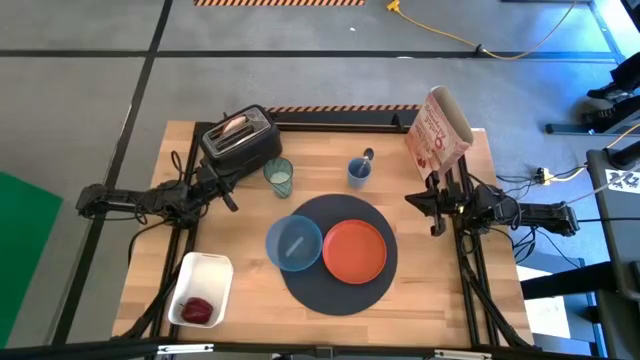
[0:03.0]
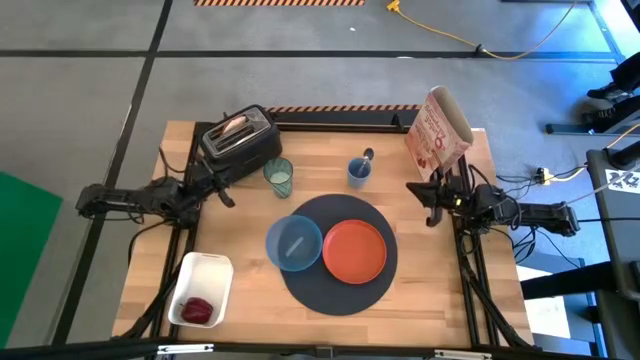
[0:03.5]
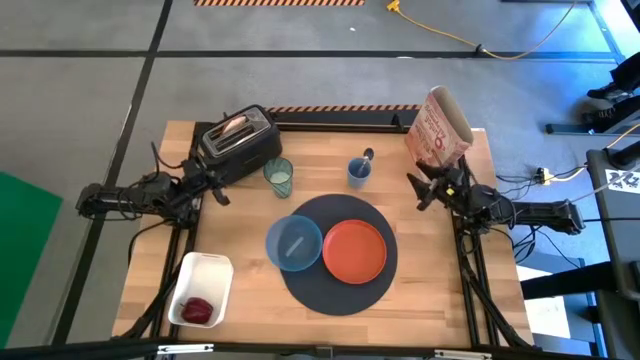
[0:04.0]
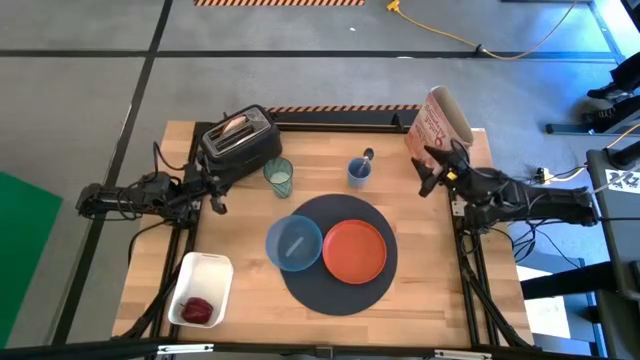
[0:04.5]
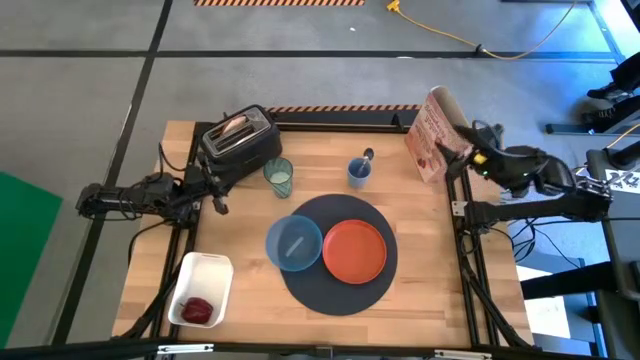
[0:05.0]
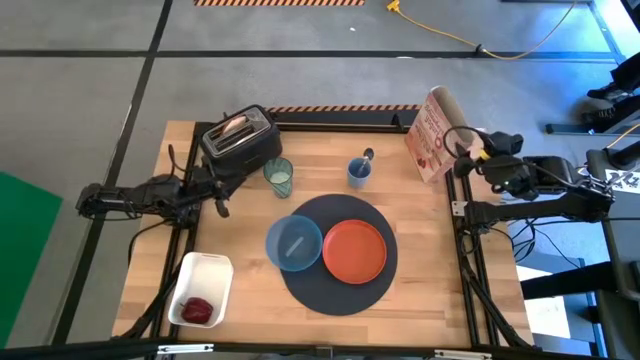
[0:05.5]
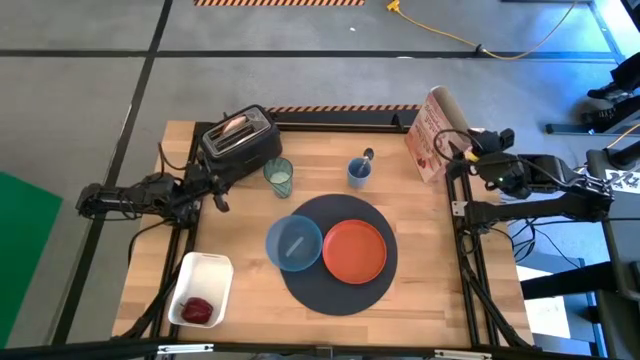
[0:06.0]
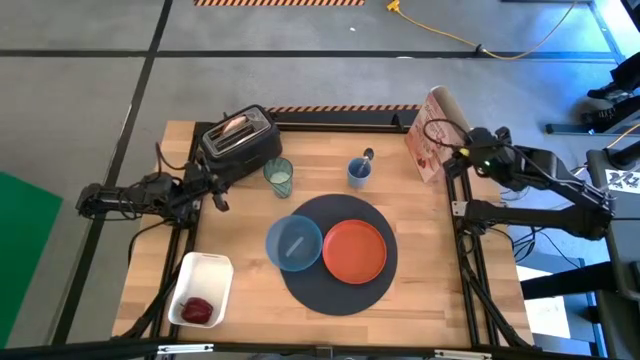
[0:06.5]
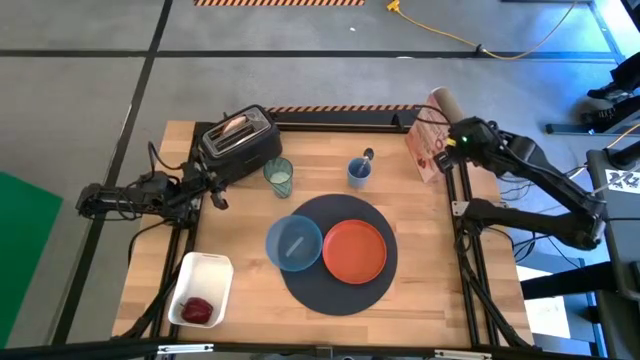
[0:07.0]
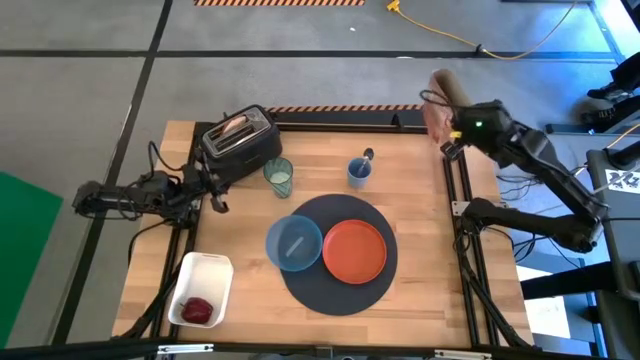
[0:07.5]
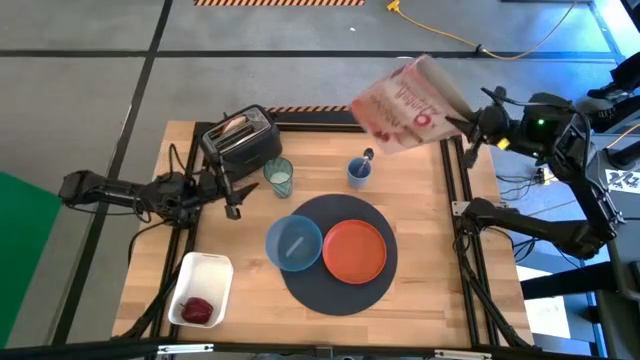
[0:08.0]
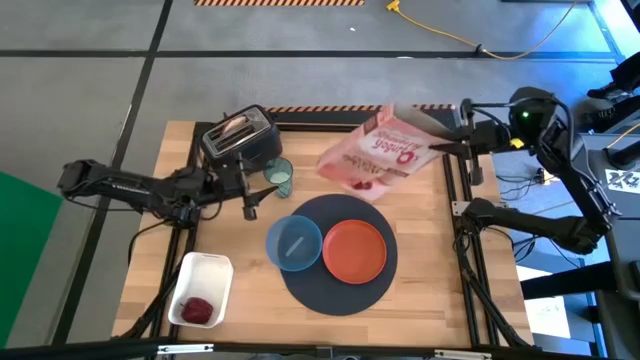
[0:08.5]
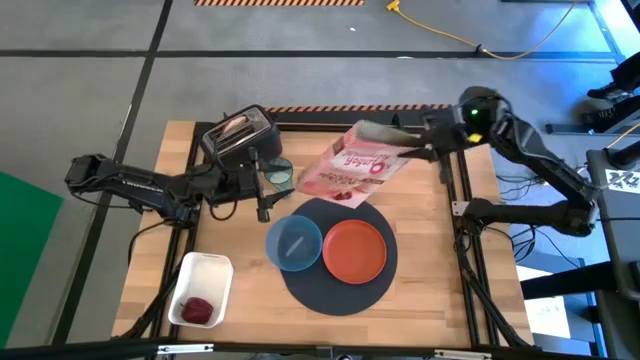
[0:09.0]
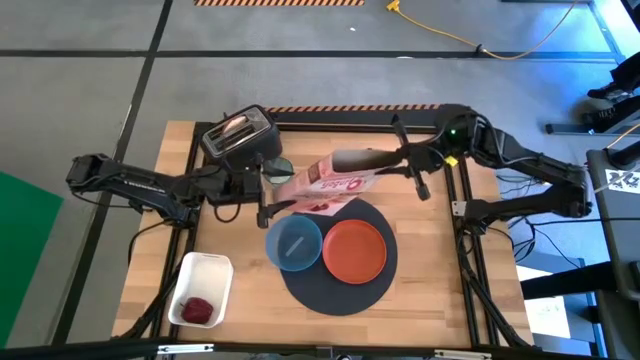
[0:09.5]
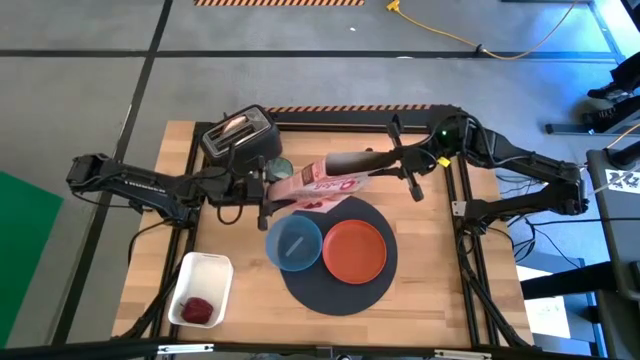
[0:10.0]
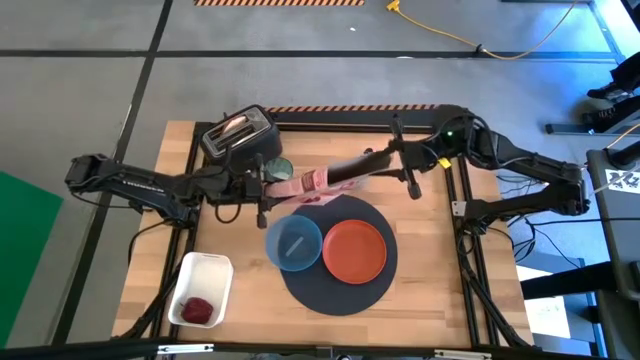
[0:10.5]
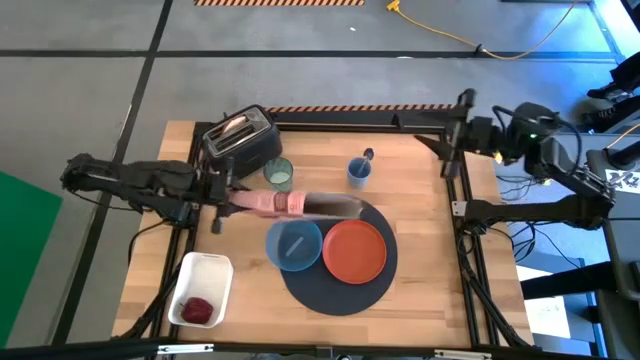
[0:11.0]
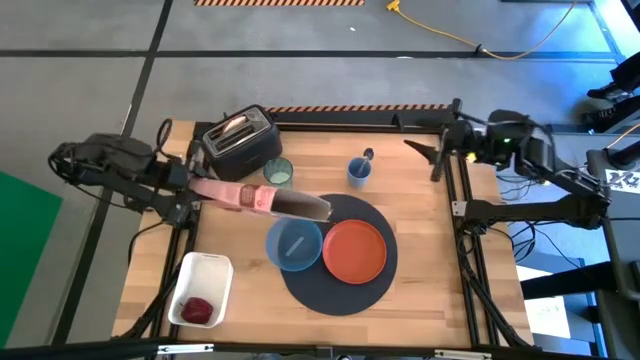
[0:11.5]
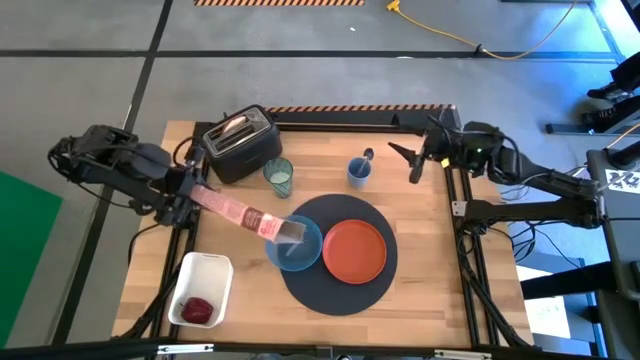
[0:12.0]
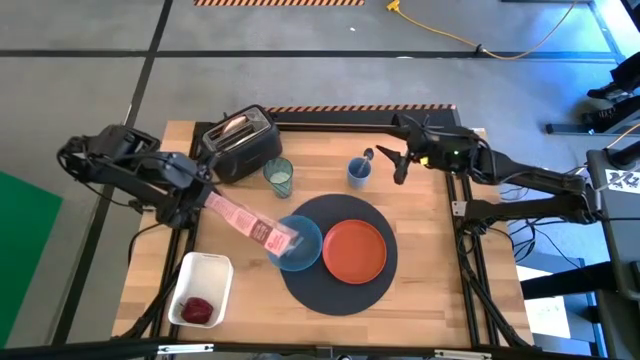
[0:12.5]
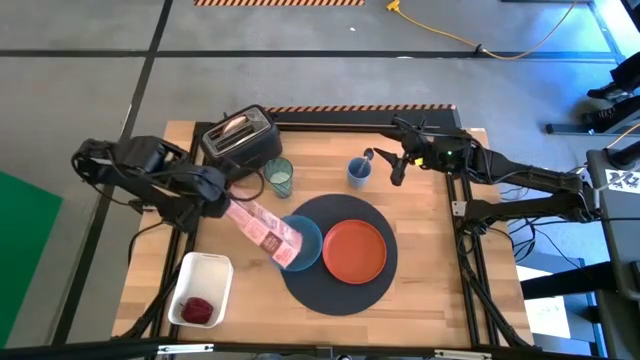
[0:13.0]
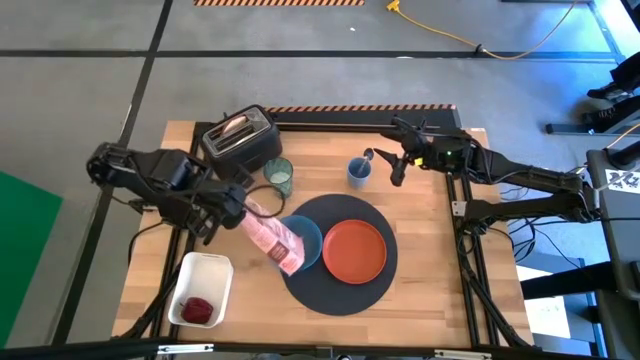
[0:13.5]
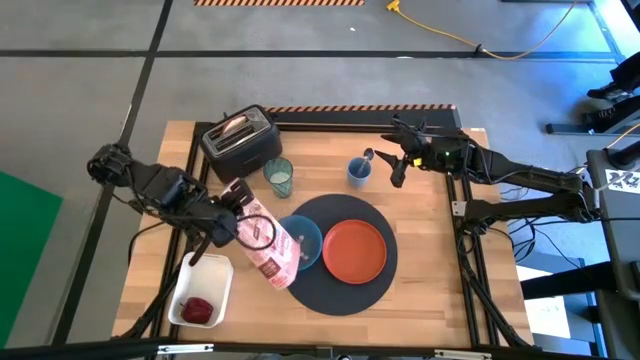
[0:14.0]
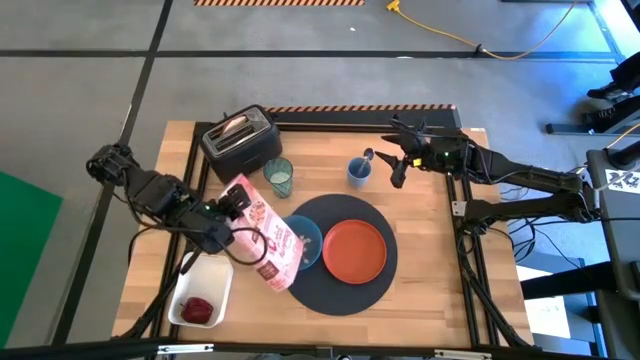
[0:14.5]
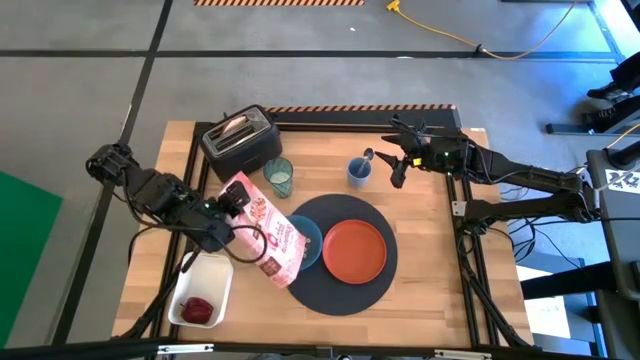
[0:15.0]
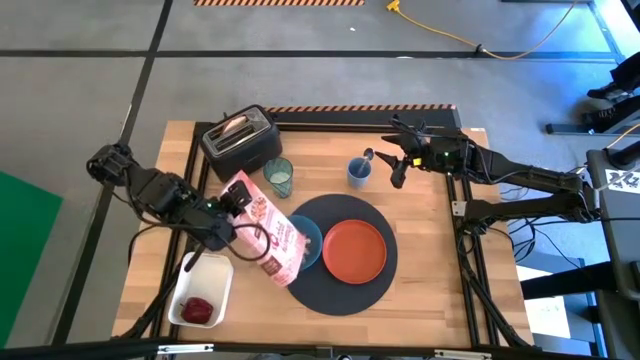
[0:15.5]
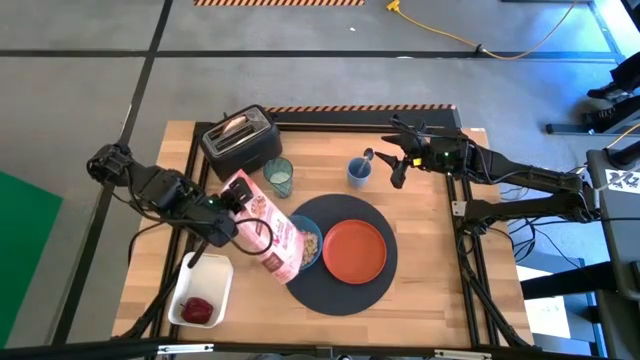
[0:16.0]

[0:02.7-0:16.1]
Task: Arrange a breakfast setting
Pour cereals from the pink cereal box into the blue bowl
